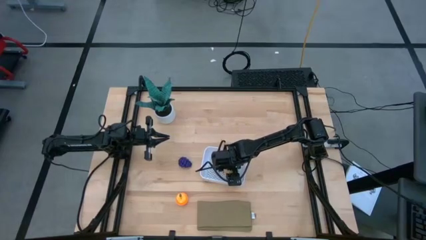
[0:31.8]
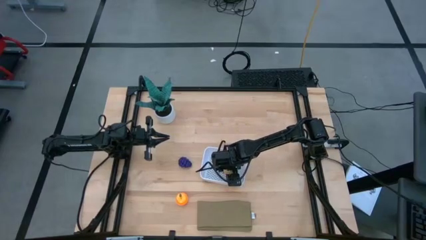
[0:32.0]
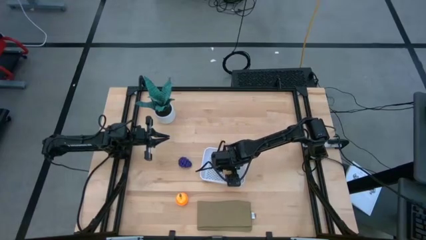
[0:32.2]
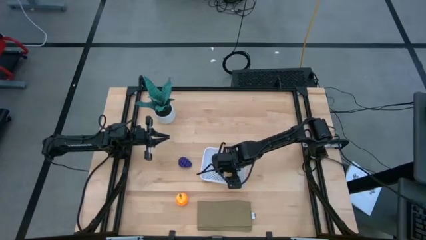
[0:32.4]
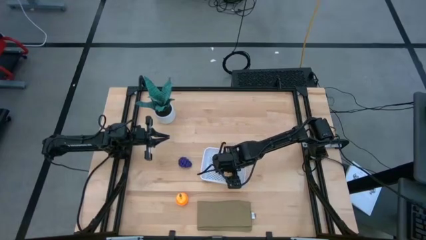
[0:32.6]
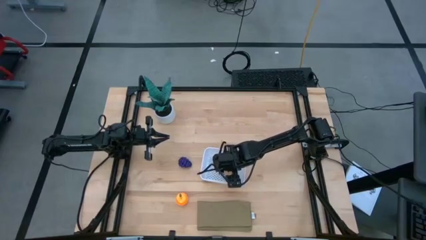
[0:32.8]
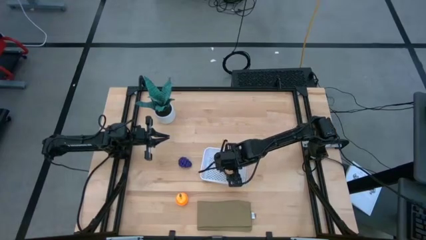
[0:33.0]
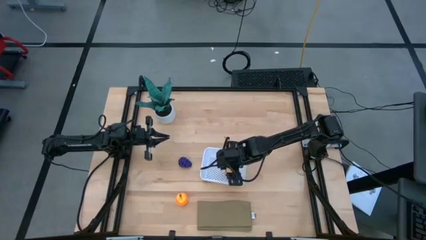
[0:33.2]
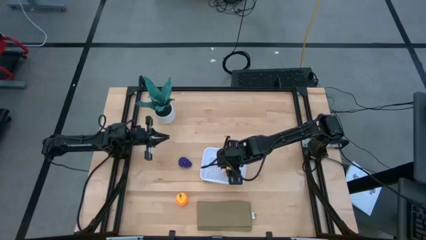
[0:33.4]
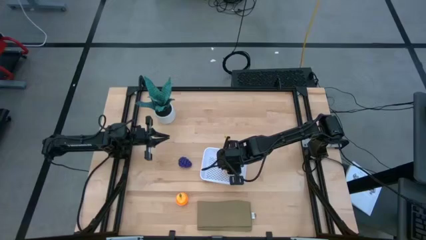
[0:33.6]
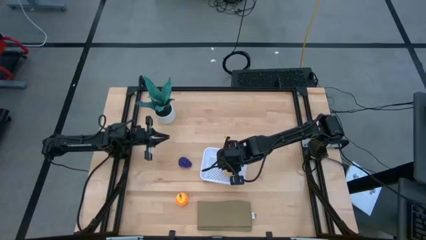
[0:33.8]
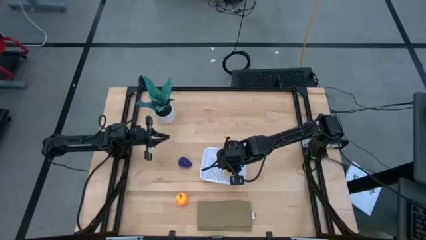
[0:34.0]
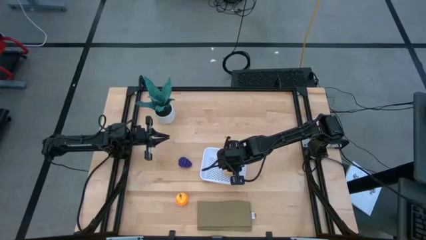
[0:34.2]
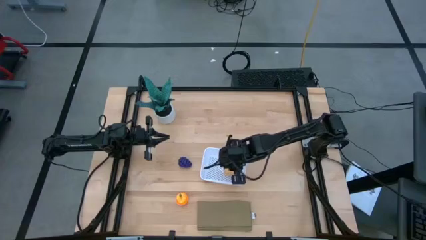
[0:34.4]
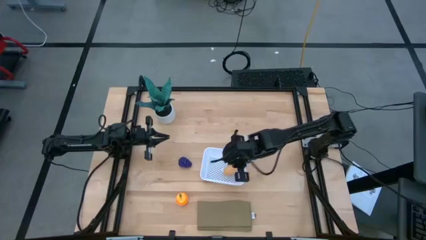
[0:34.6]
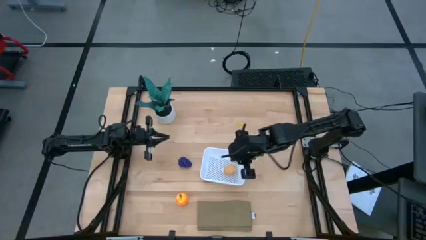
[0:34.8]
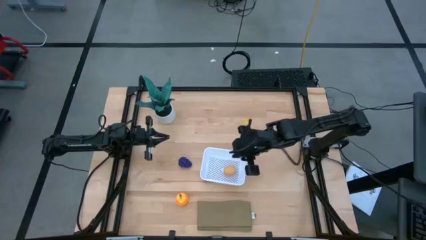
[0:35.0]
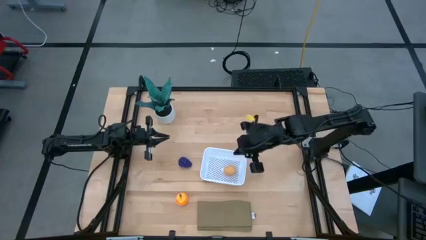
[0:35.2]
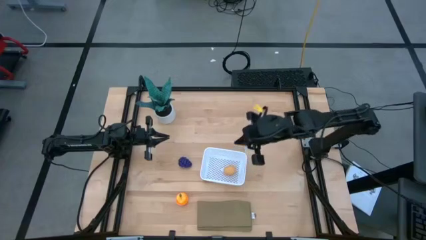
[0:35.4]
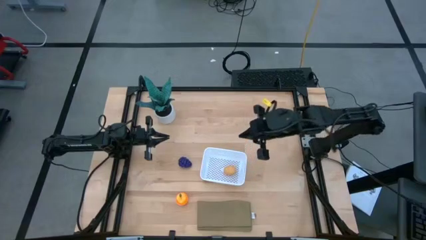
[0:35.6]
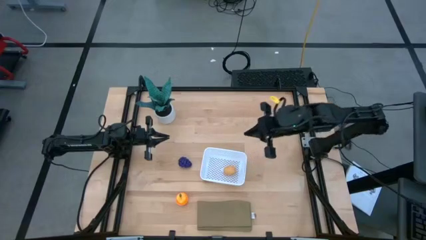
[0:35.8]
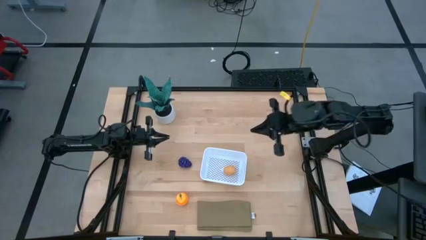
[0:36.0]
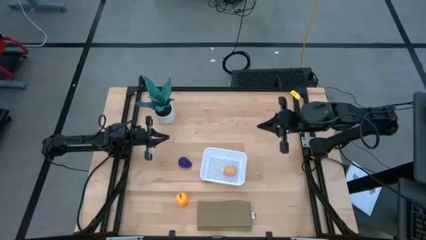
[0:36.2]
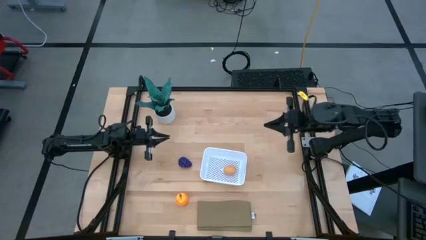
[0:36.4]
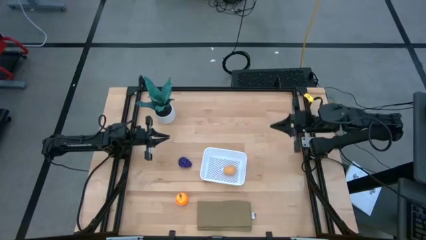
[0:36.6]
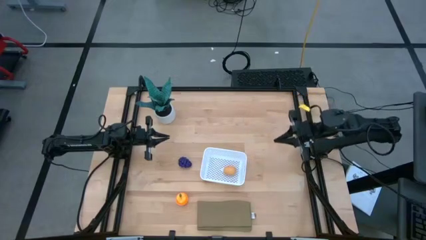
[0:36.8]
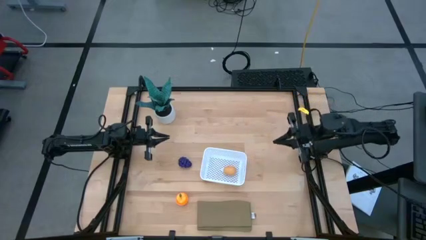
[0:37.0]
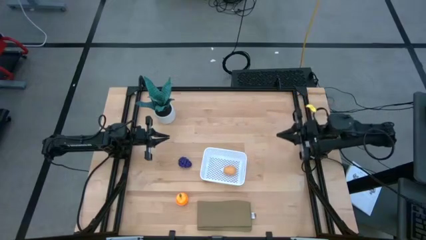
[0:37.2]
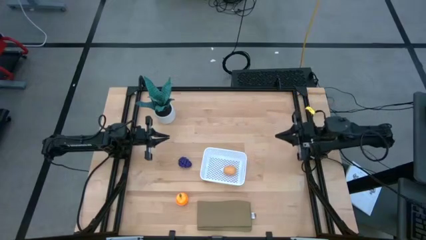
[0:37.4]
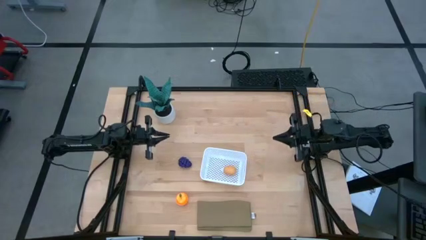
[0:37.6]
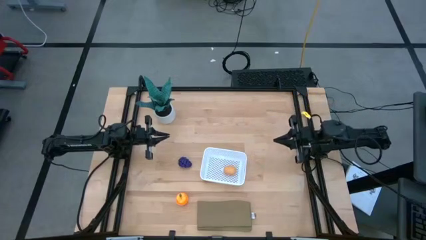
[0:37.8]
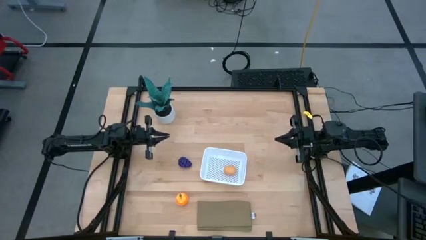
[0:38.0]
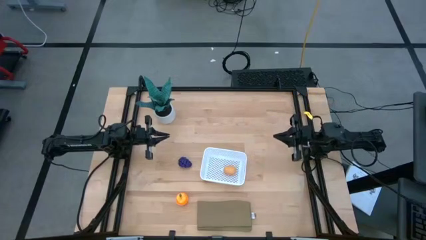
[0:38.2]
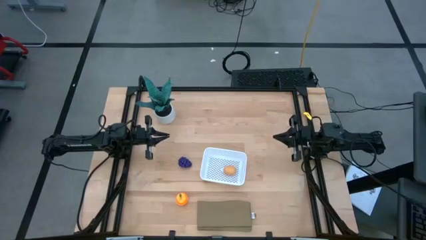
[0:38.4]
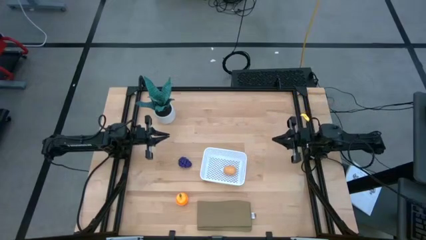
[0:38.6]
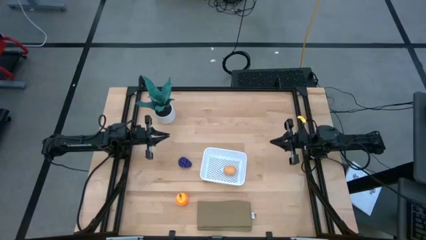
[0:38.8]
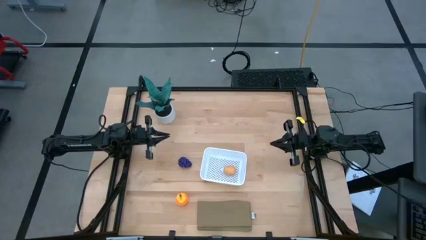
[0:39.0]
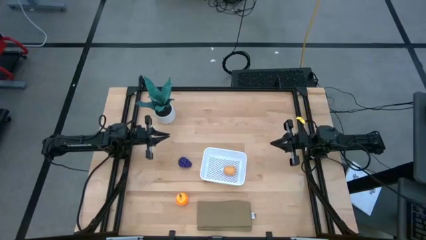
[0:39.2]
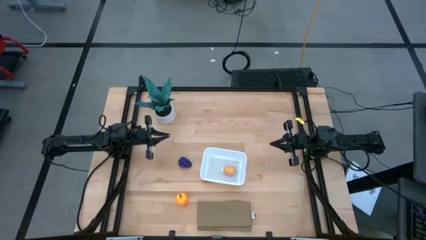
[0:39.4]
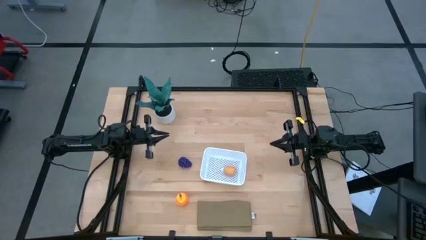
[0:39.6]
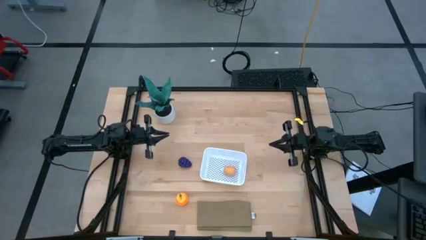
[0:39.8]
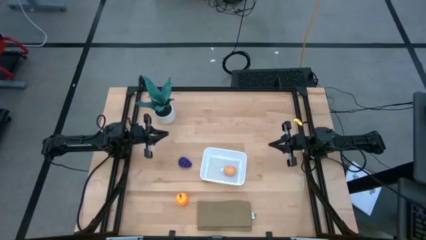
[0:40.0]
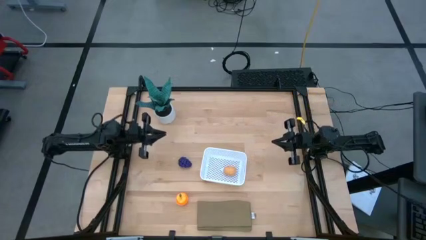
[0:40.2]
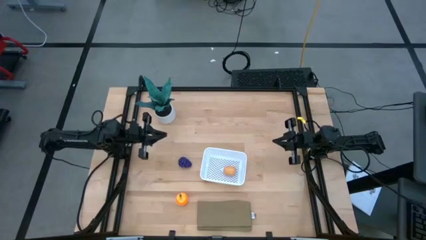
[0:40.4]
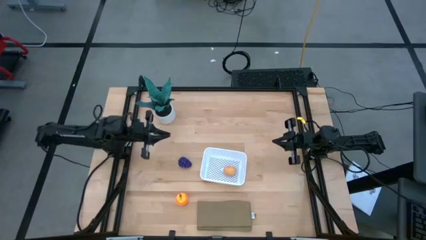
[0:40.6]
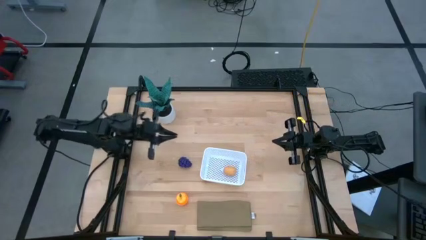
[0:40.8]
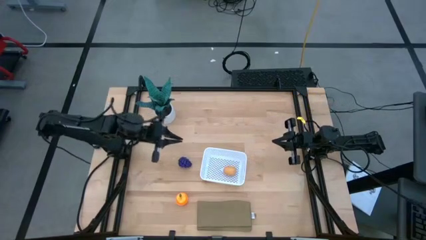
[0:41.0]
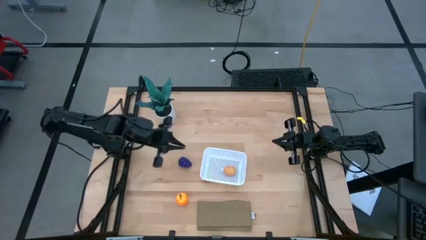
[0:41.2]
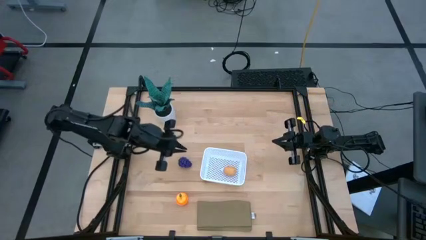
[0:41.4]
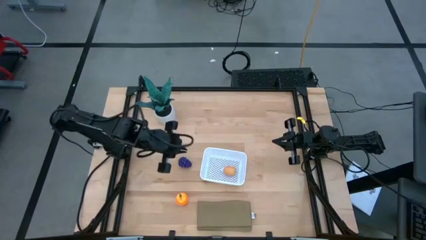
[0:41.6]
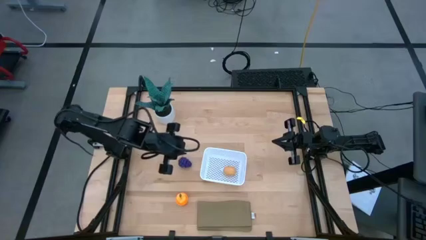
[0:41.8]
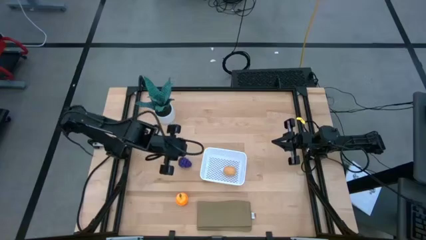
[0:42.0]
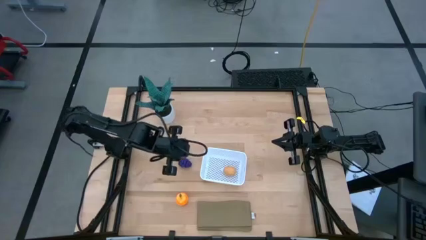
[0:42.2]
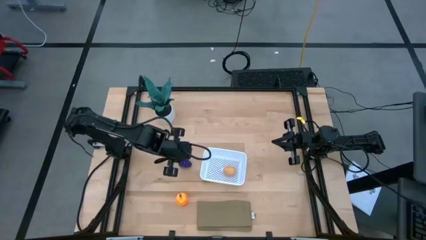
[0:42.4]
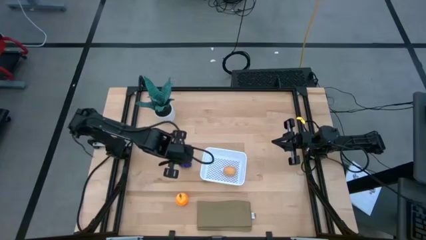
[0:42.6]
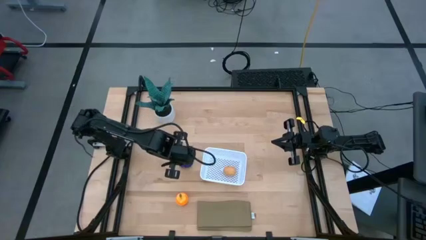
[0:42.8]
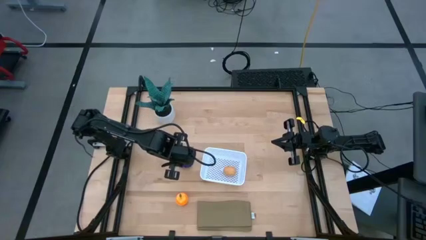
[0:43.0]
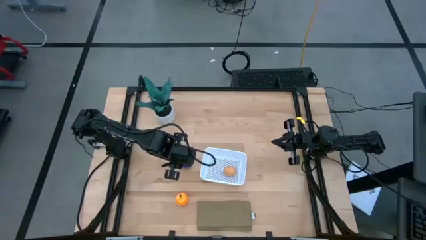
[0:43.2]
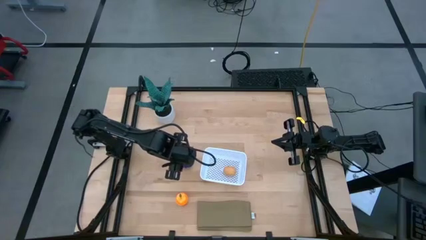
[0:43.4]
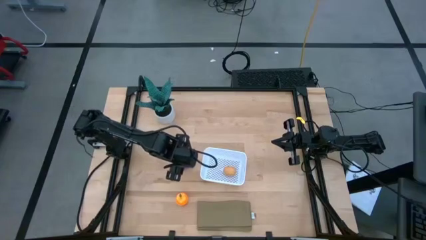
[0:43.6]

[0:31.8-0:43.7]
Task: Pick and placing Produce into tupperware
Put the grapes into the white basket

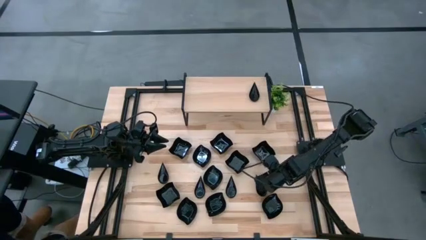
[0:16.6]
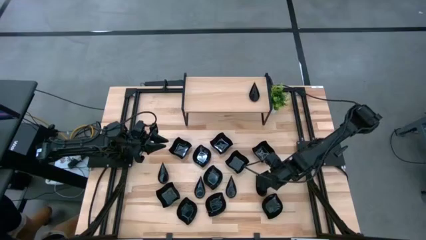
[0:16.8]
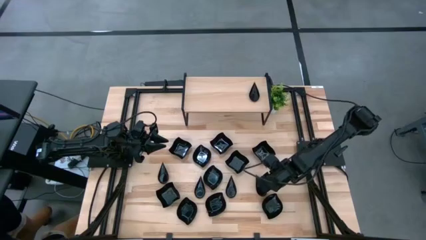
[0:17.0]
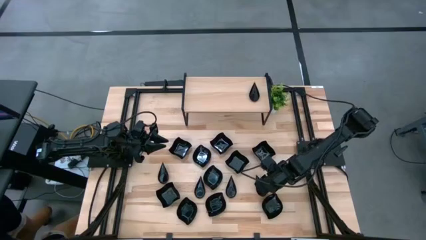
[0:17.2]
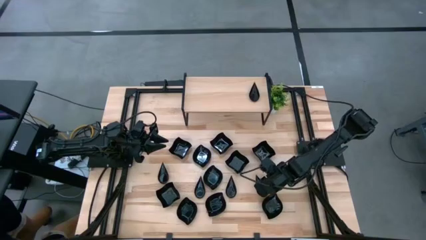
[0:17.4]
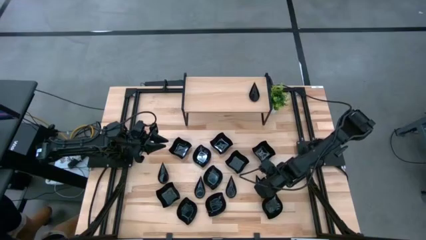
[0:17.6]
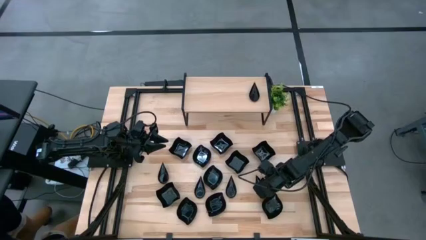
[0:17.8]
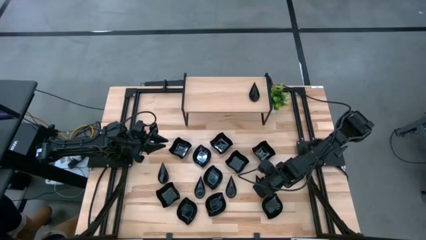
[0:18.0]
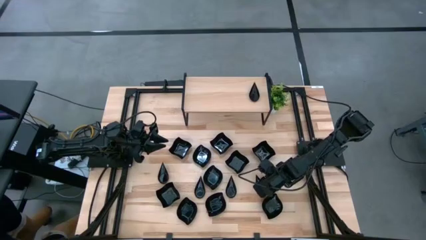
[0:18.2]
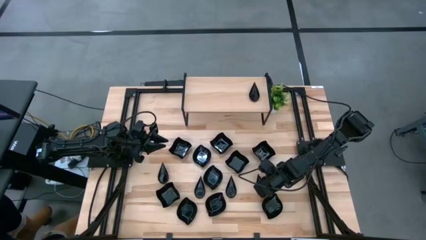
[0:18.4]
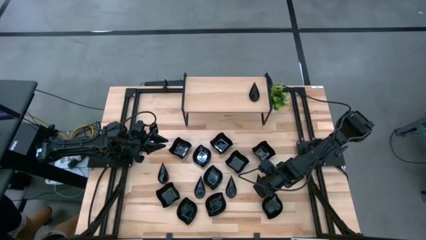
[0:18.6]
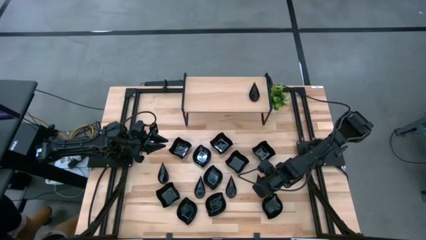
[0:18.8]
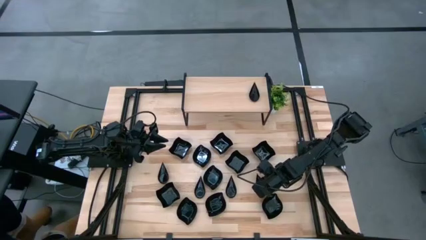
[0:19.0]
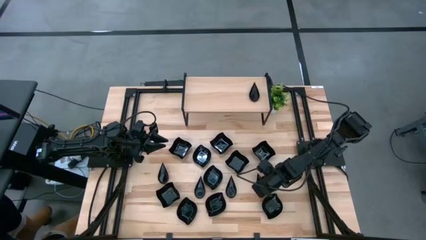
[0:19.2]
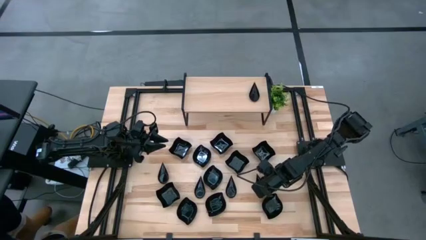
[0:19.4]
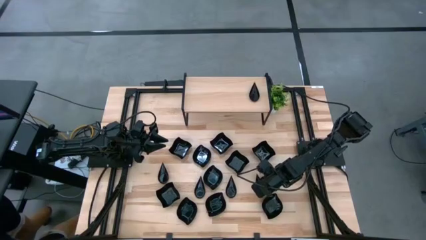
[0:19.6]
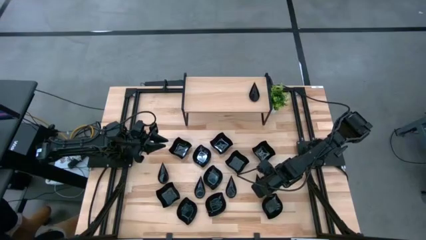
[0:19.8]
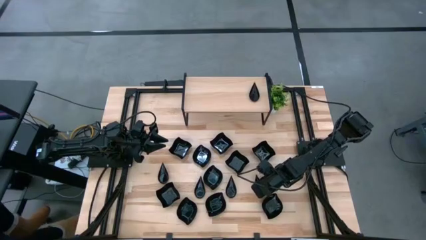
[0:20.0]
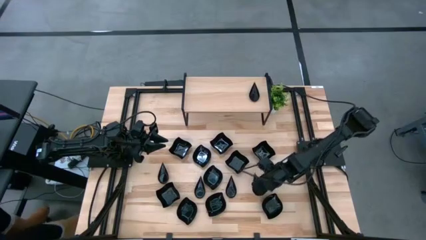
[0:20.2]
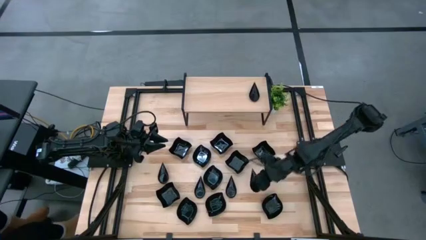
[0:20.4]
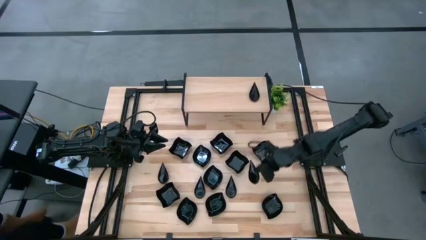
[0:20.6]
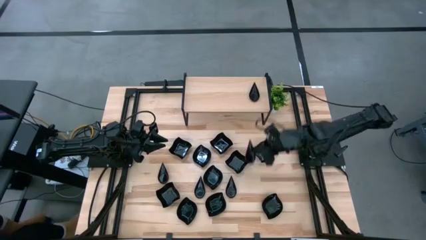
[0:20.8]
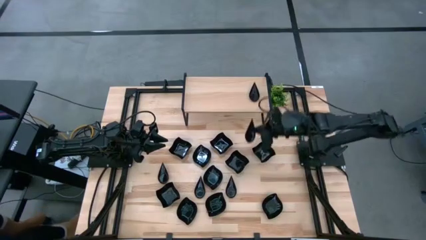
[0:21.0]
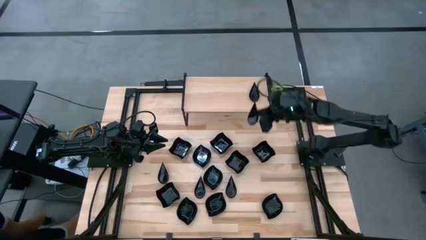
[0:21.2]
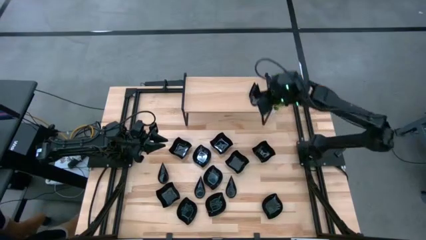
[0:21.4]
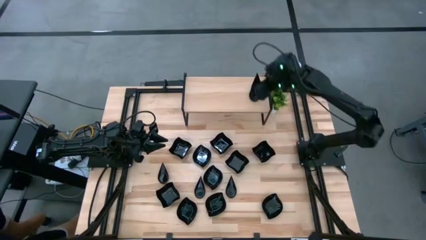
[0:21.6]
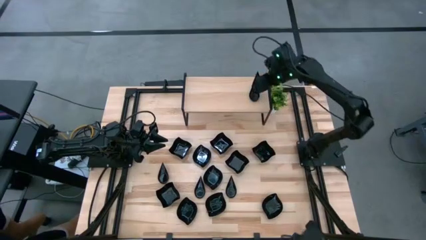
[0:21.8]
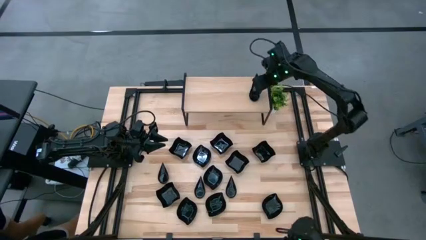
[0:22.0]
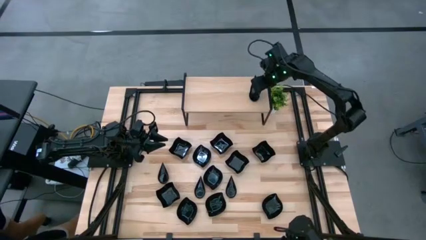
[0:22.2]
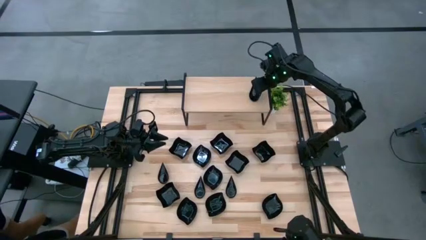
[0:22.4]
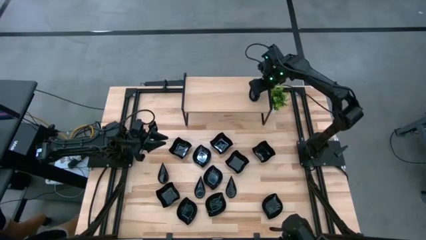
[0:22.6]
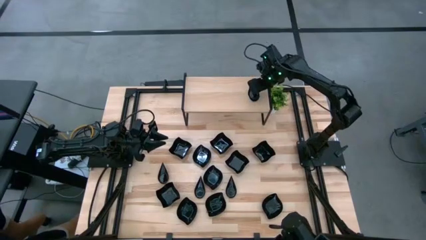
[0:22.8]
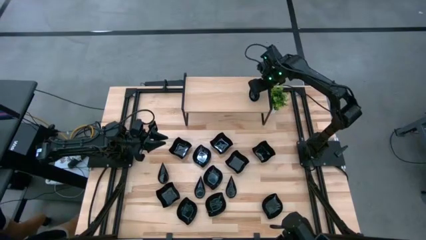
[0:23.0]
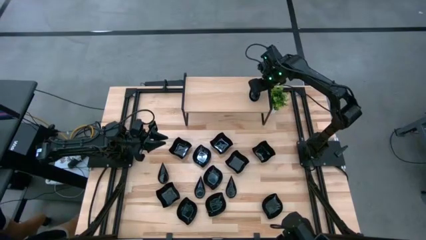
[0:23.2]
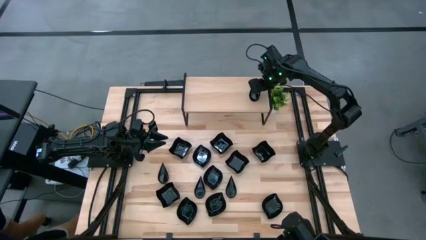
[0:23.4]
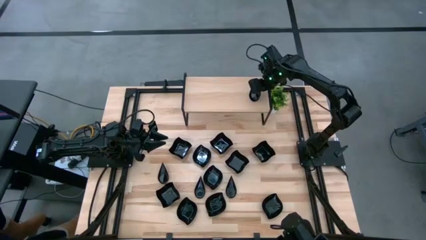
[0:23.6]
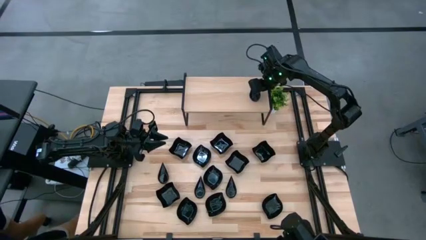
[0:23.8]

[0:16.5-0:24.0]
Task: Pick & Place Mini shaped plates
Stack the black drop shaped plate on top of the other black drop shaped plate on the shelf
